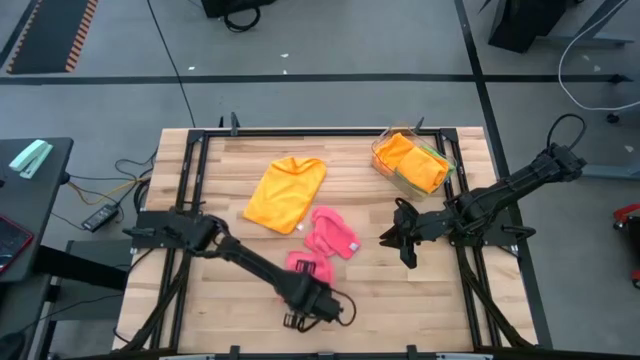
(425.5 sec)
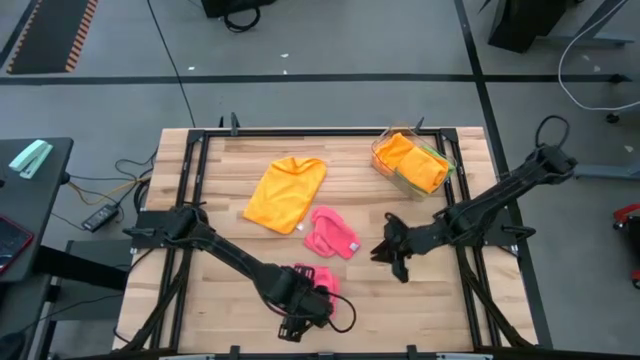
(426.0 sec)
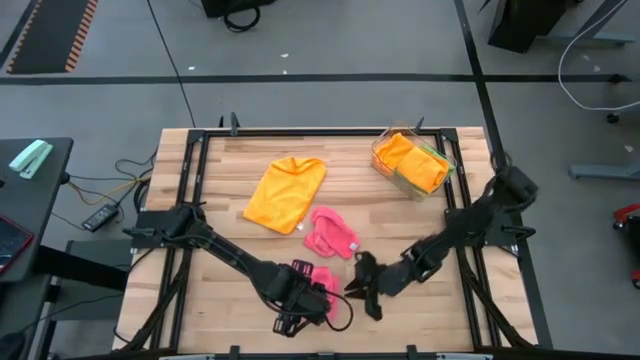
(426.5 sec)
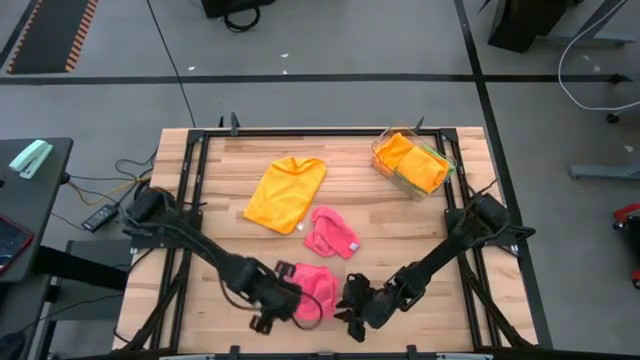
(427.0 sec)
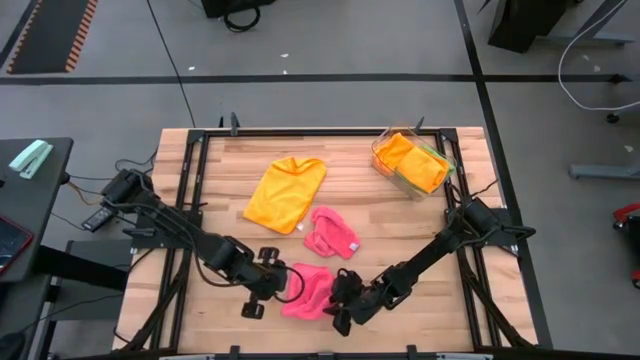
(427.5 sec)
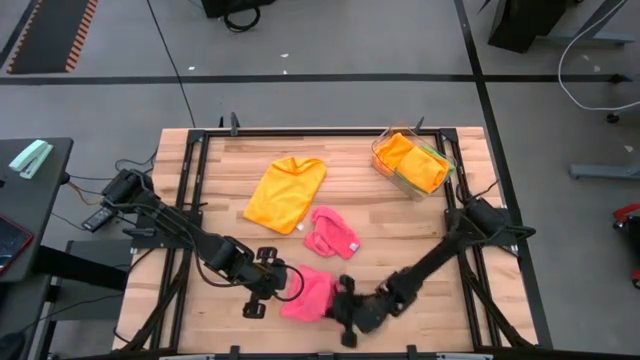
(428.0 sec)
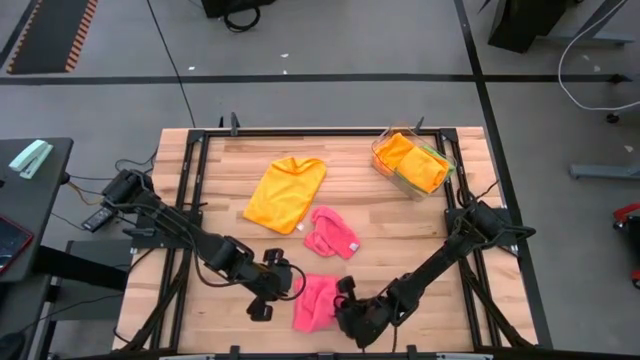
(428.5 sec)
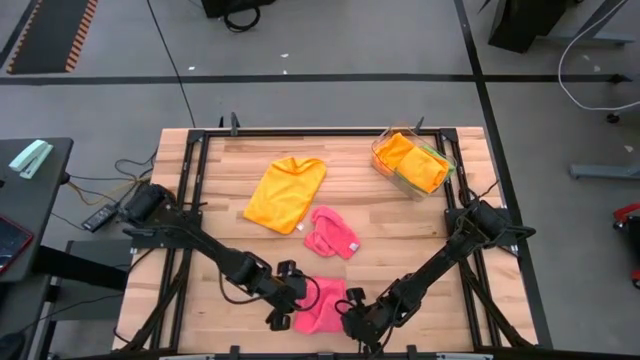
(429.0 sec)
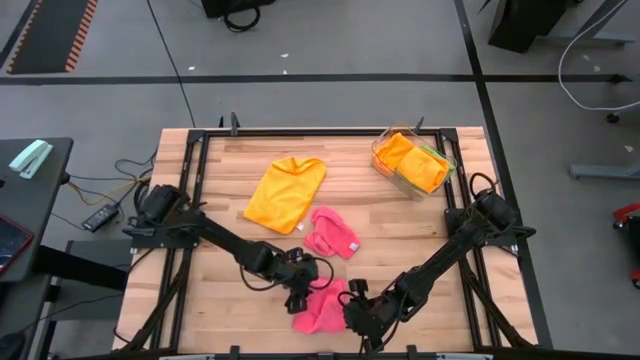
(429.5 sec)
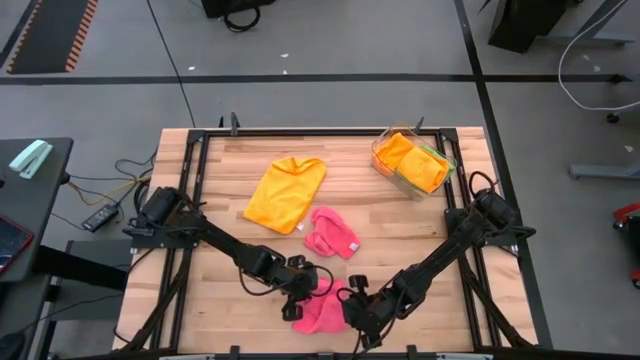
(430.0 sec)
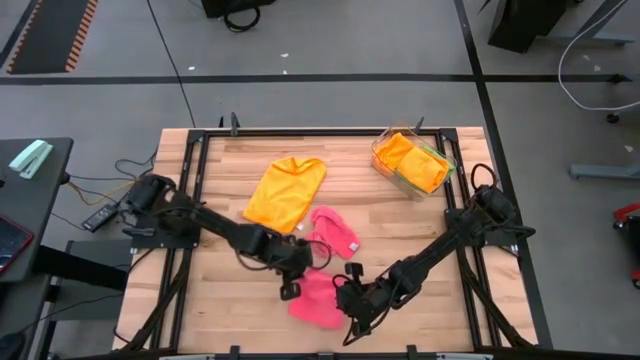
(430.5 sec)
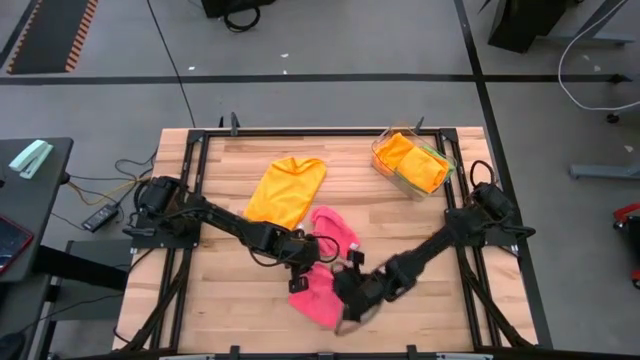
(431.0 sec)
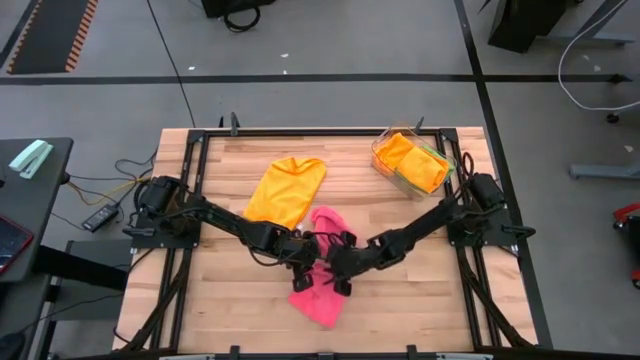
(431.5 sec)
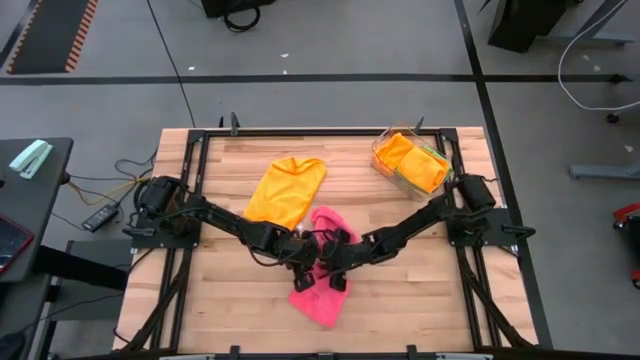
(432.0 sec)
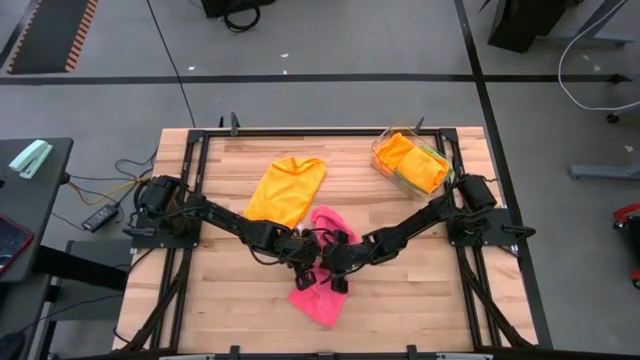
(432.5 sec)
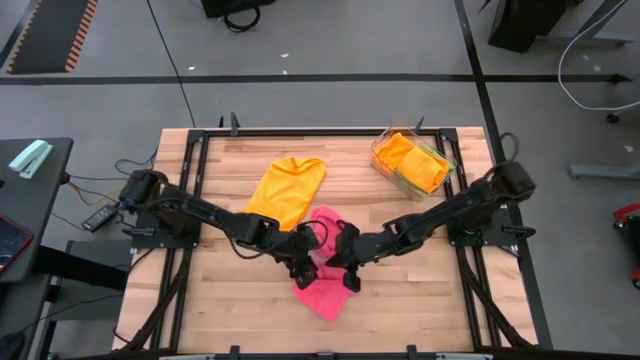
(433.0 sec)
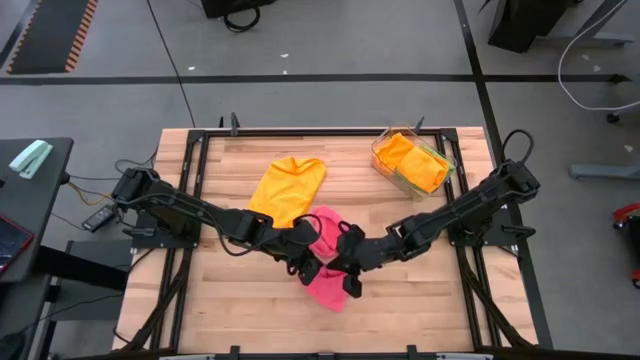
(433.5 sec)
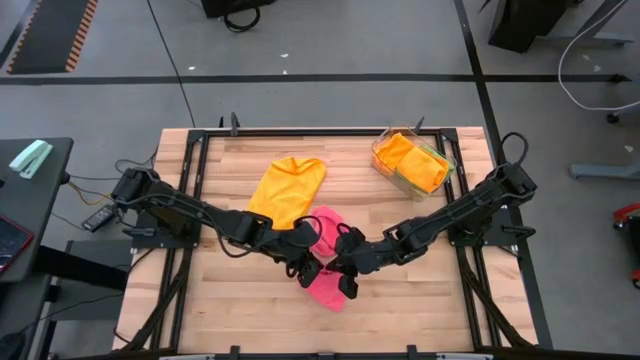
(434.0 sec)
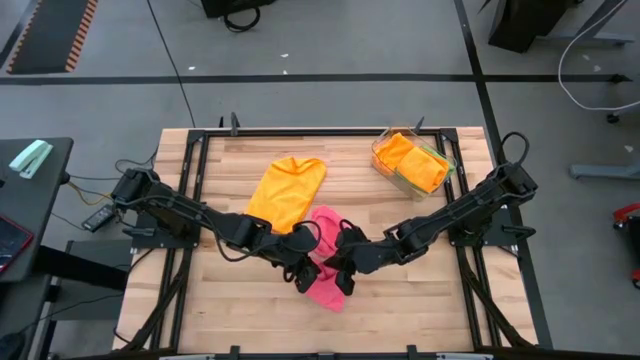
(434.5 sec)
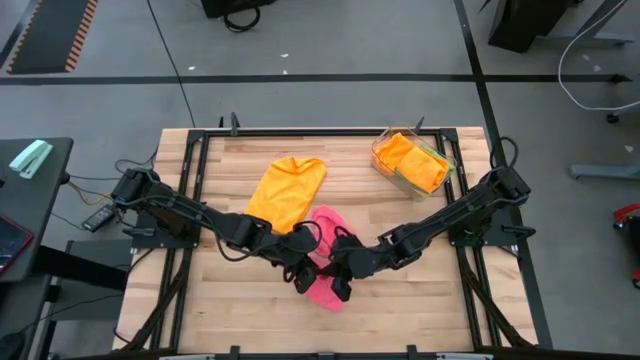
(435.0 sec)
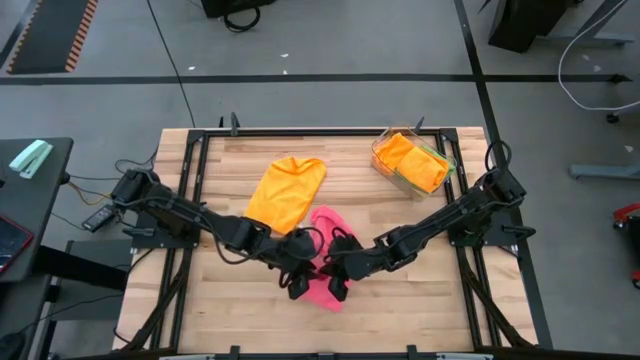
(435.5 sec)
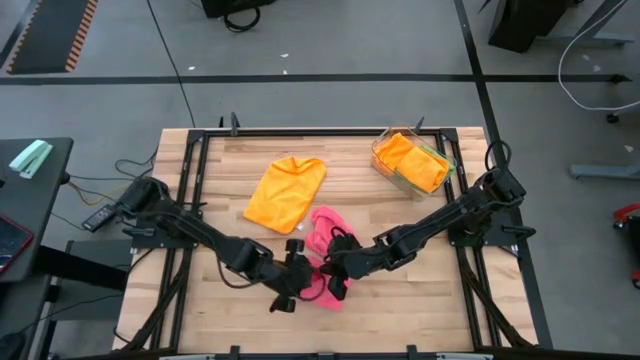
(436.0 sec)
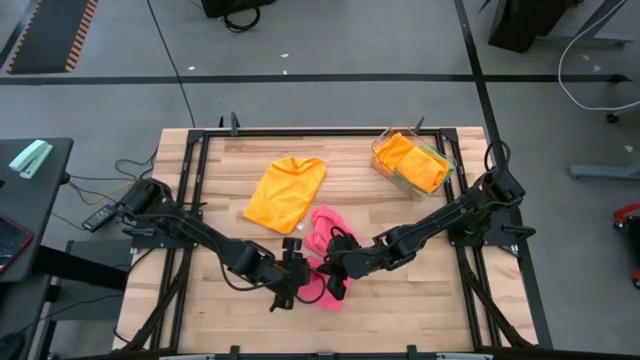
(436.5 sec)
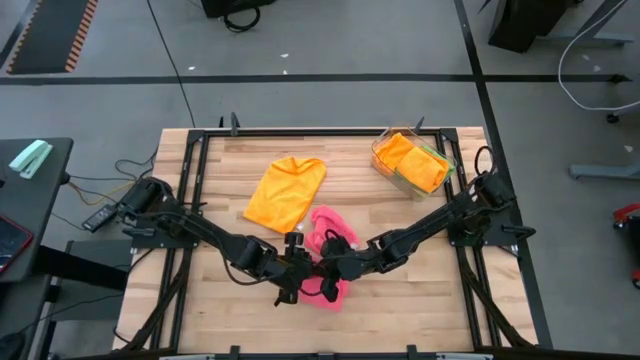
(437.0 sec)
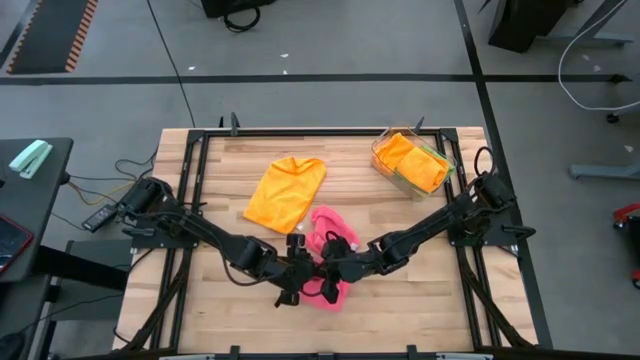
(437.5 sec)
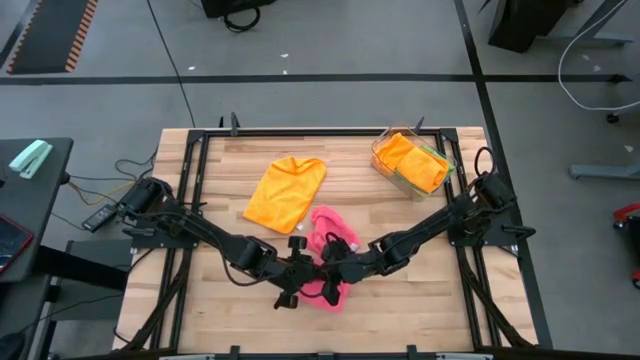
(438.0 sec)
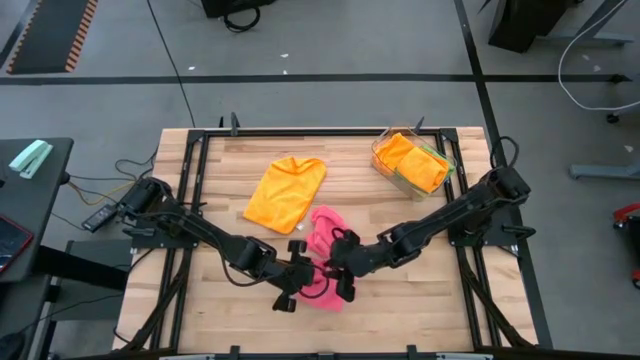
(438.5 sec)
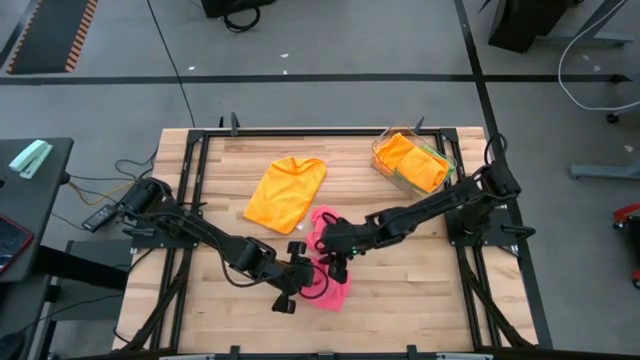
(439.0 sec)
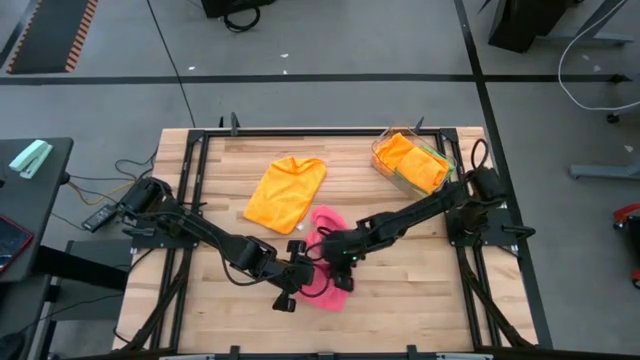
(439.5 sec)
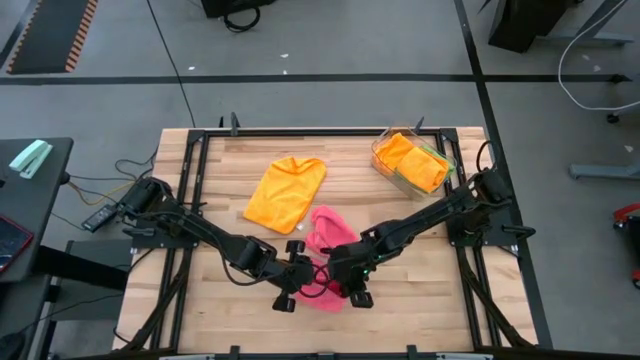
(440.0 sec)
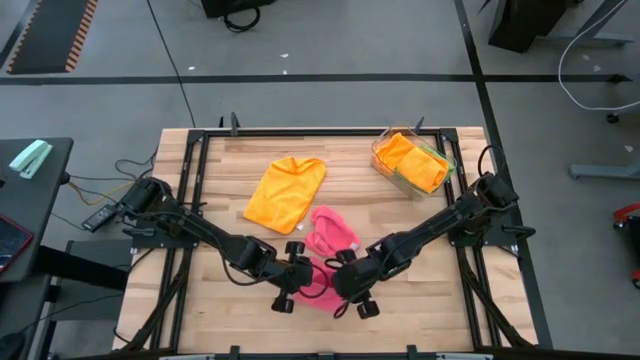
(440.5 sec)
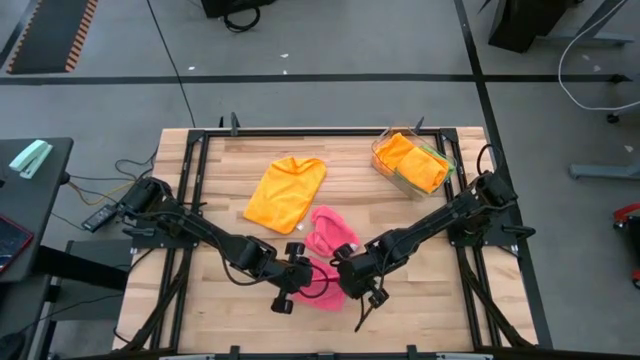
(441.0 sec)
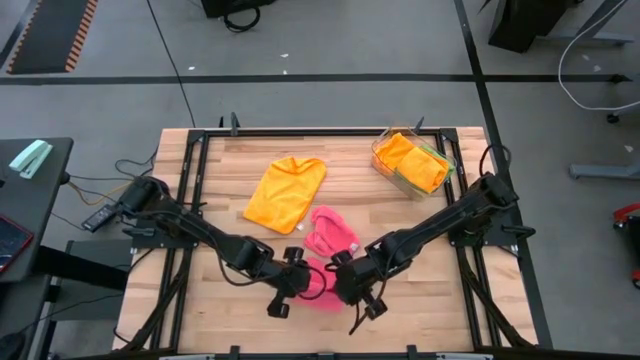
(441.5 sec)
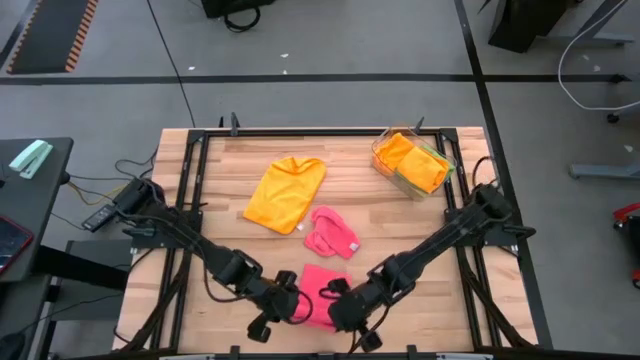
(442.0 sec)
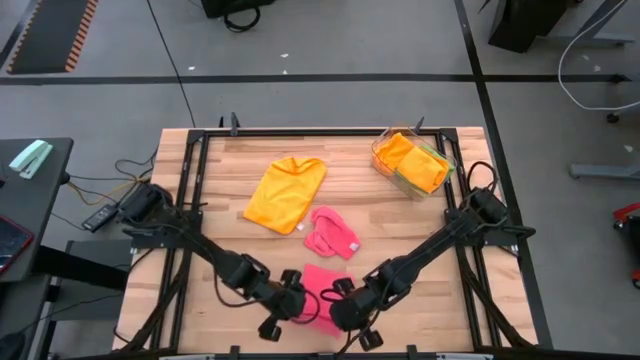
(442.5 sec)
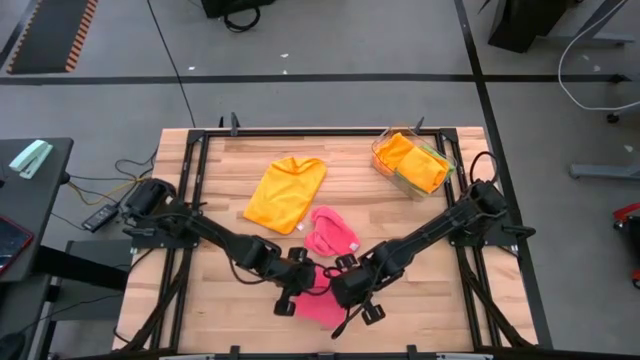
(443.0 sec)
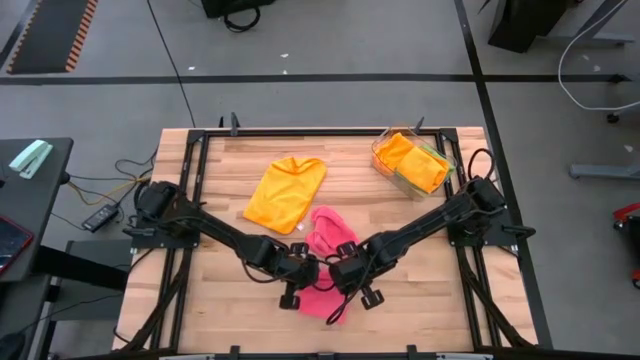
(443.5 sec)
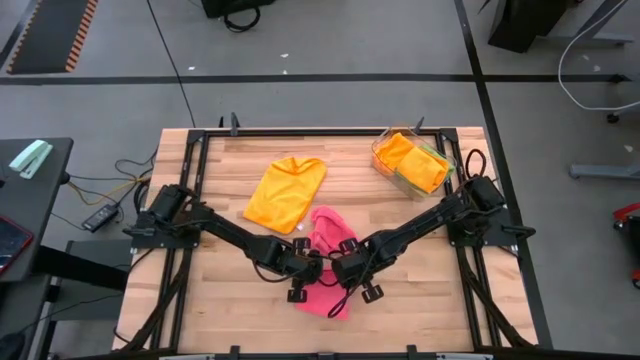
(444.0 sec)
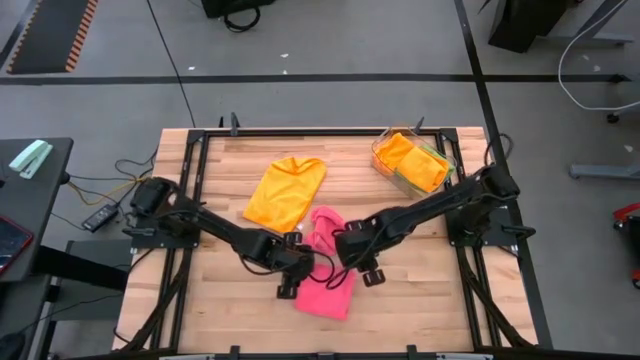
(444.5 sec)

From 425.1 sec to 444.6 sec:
Task: Fold microfiber towels
Fold the left pink towel

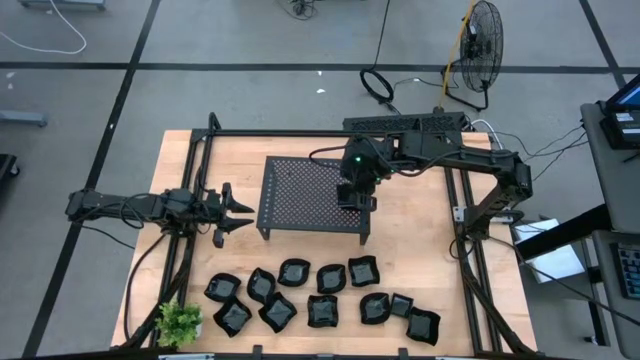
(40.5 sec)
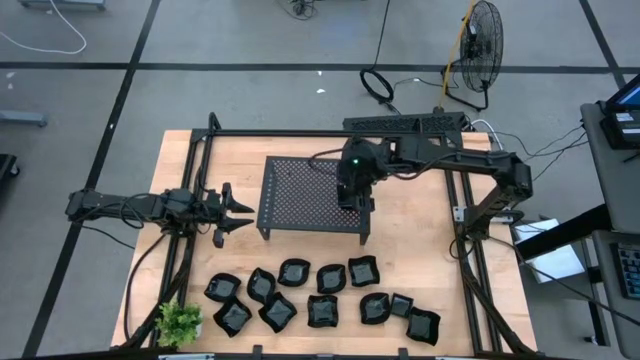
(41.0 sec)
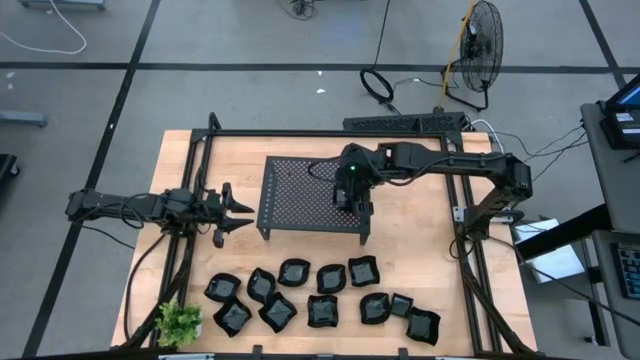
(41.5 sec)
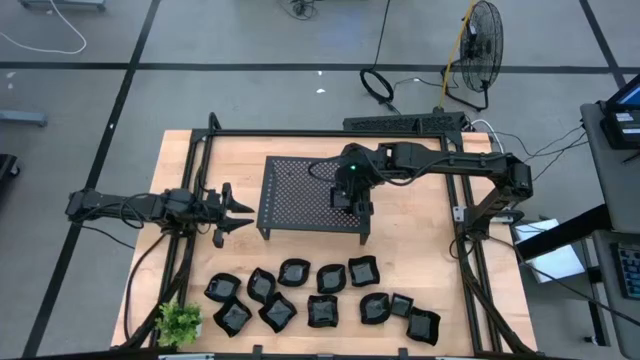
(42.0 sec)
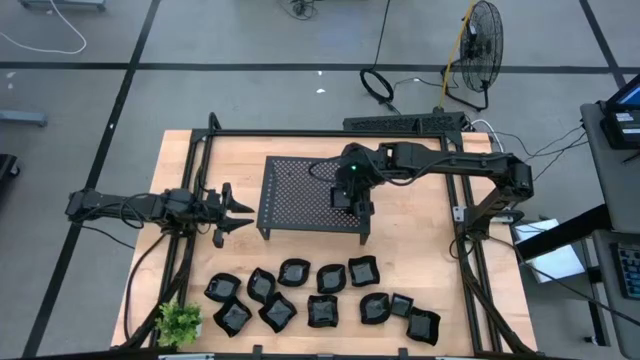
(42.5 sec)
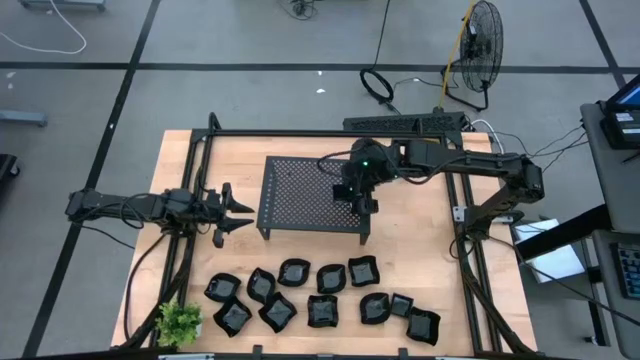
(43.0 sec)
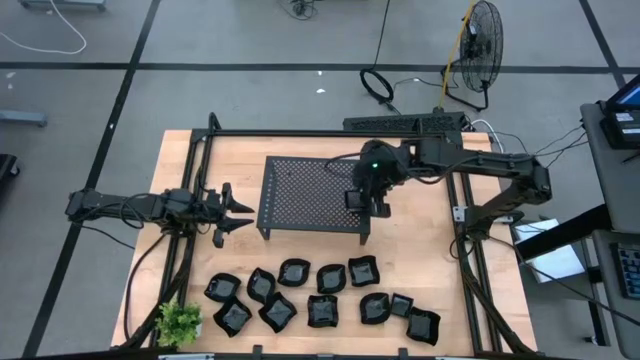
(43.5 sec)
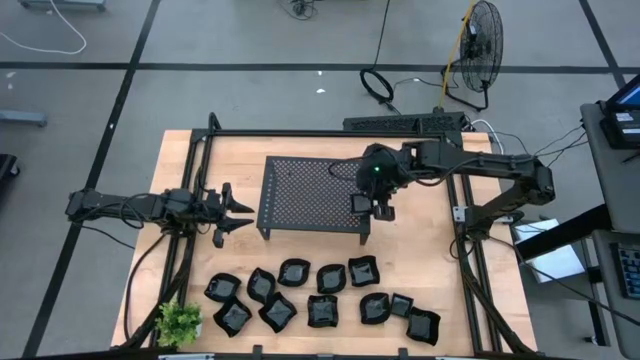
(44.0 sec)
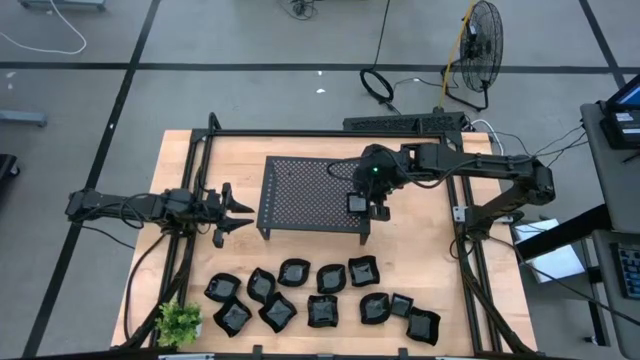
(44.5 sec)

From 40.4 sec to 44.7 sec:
Task: Pick & Place Mini shaped plates
Adjust the square plate
